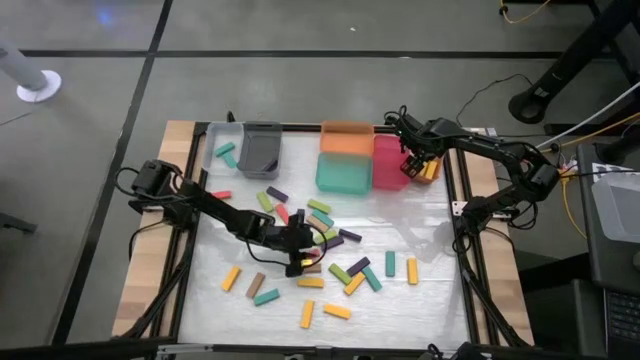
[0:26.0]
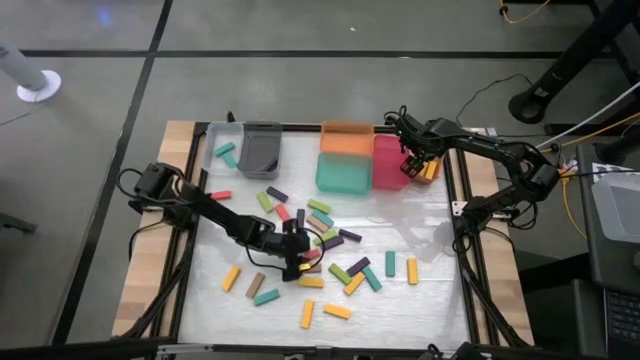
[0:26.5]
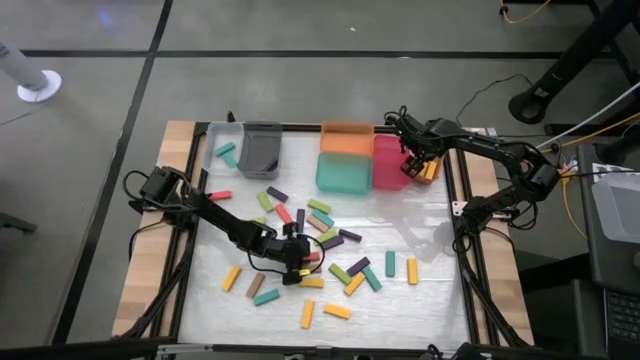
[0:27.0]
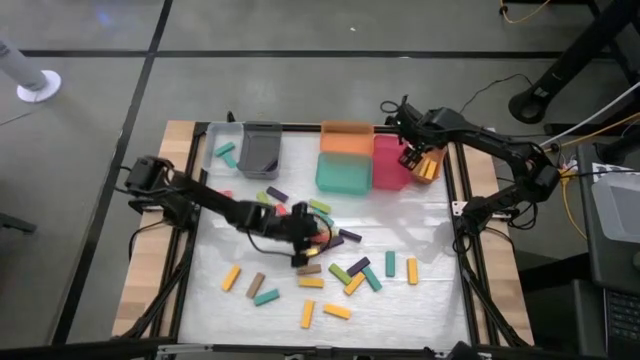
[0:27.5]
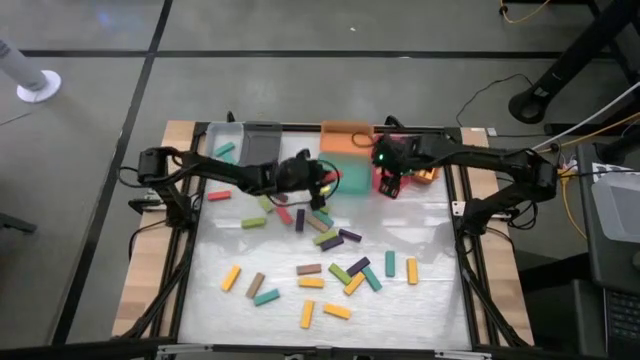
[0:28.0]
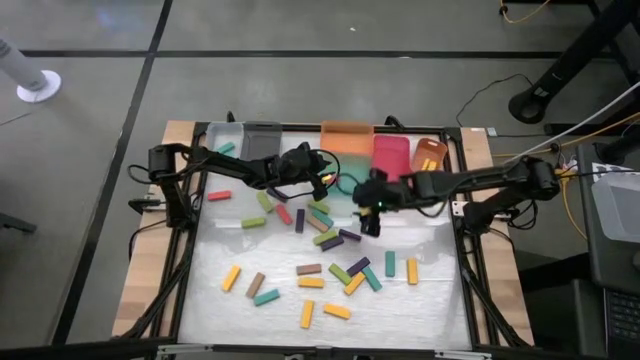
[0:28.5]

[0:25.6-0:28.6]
Task: Sort blocks
Put the orange block into the light blue bin

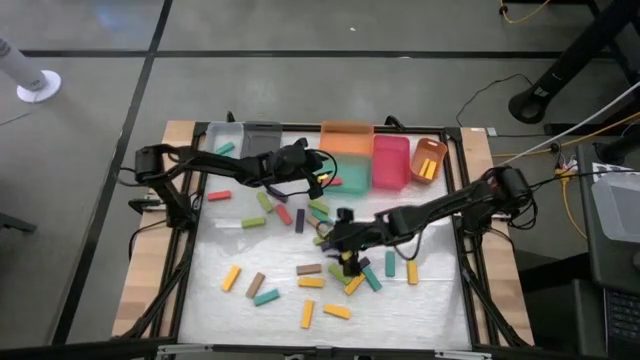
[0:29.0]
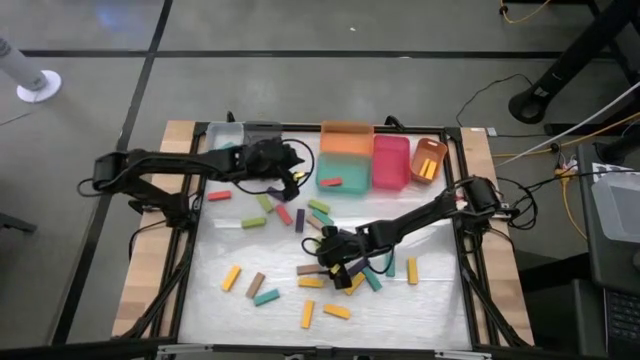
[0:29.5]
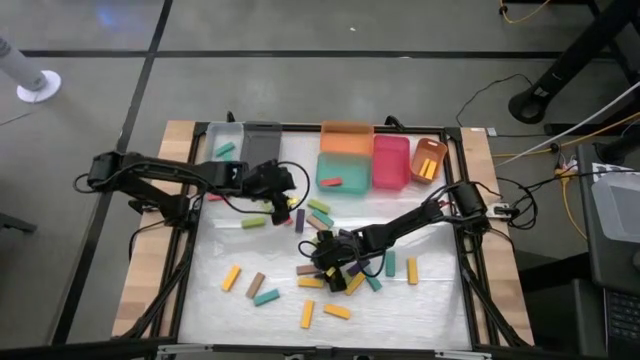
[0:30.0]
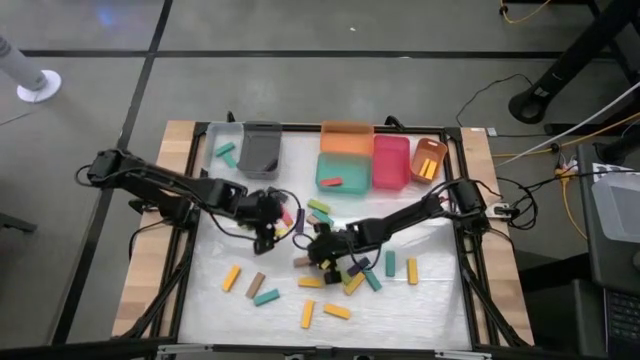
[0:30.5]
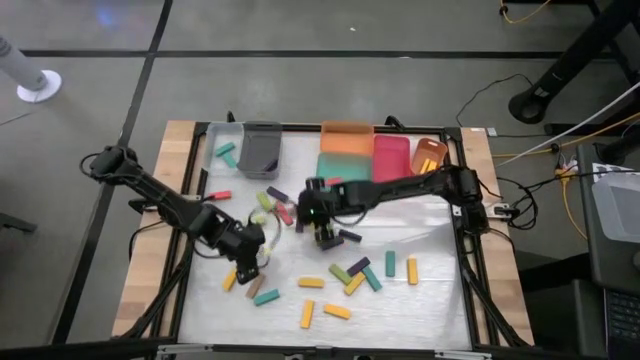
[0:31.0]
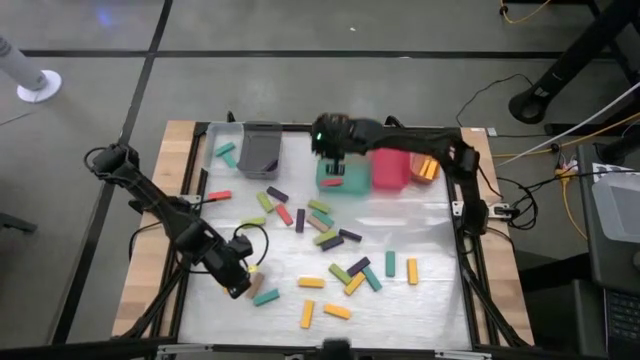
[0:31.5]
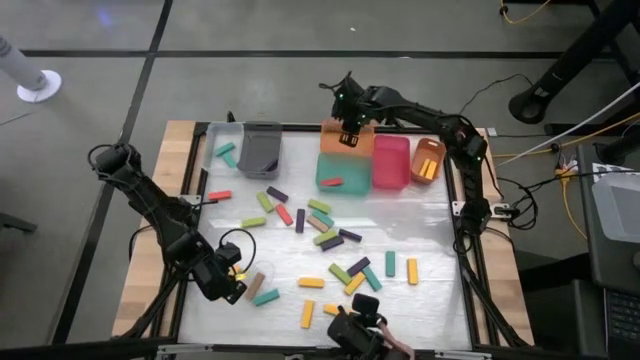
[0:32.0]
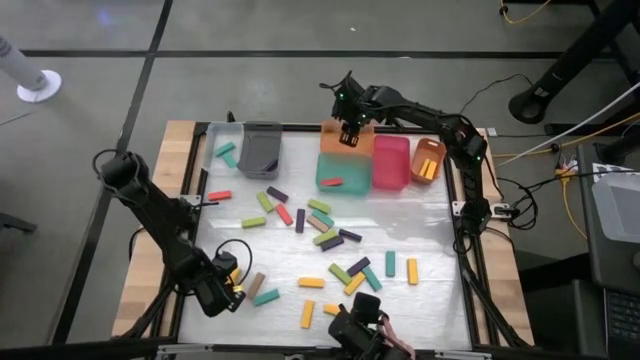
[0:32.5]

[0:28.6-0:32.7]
Put the brown block into the left orange bin

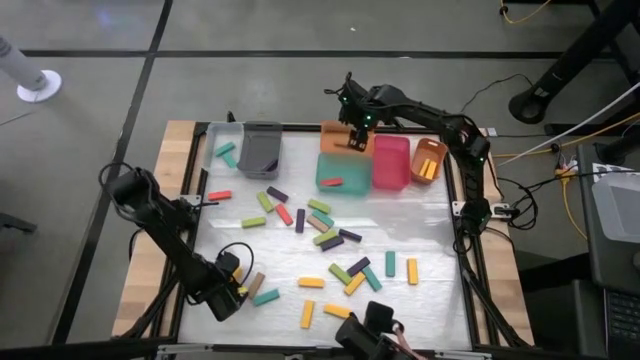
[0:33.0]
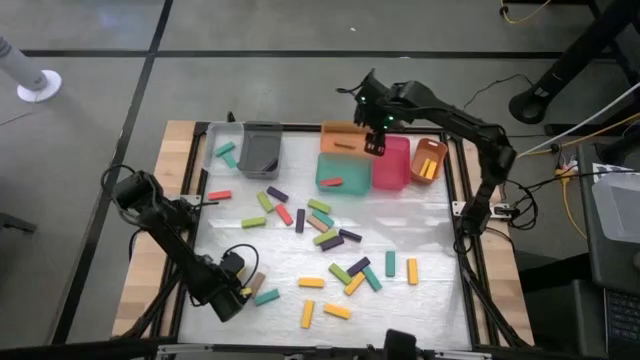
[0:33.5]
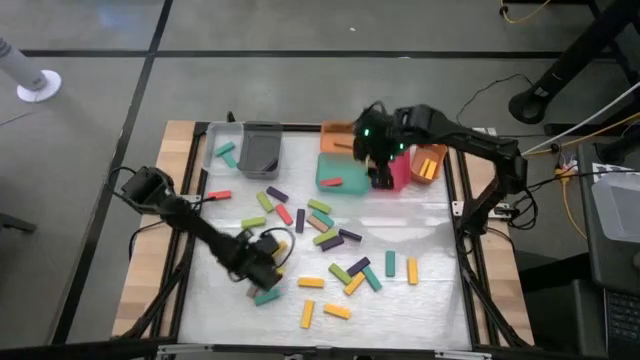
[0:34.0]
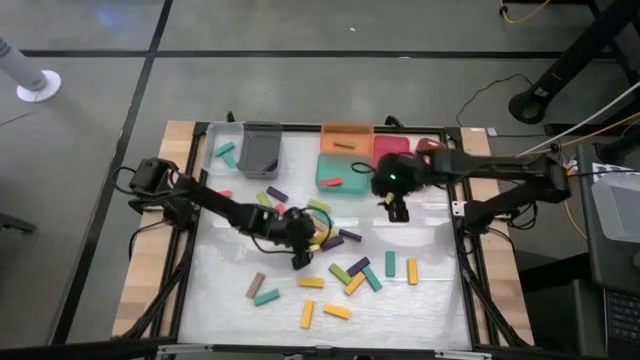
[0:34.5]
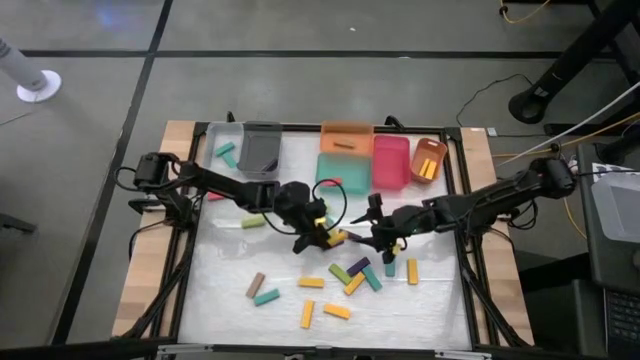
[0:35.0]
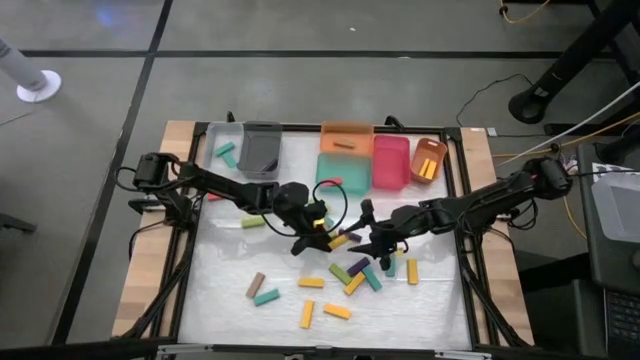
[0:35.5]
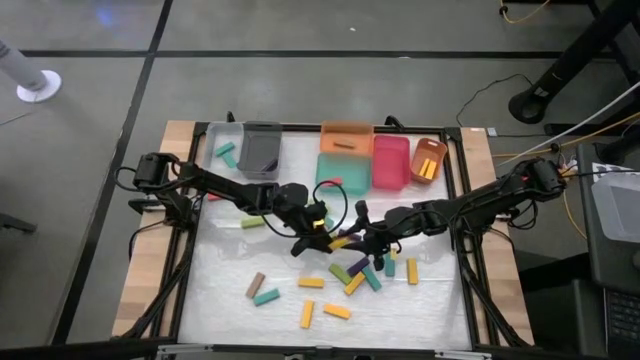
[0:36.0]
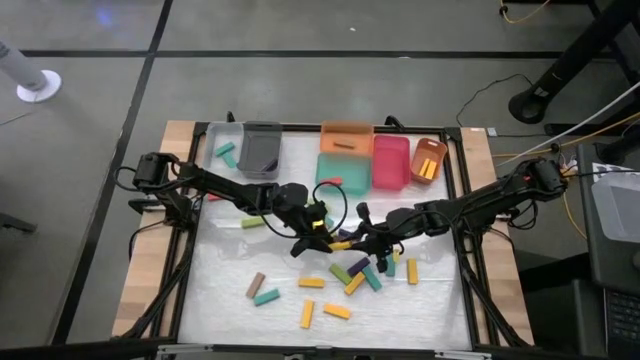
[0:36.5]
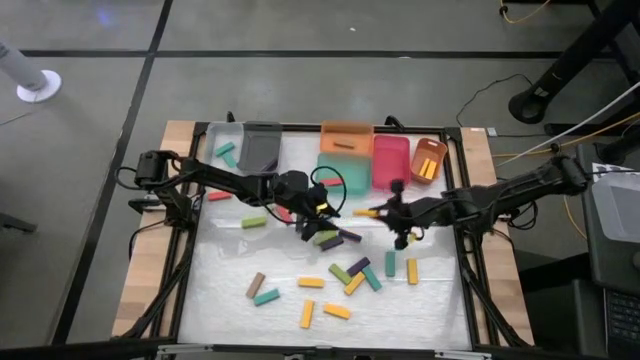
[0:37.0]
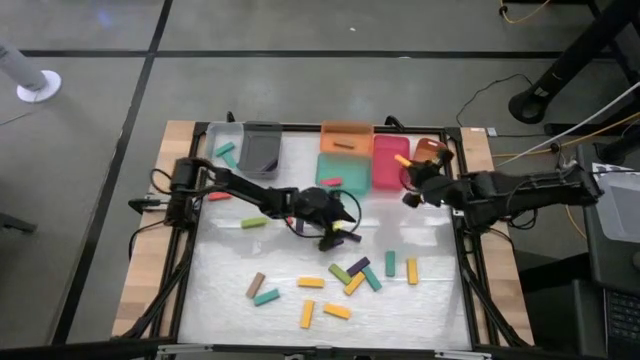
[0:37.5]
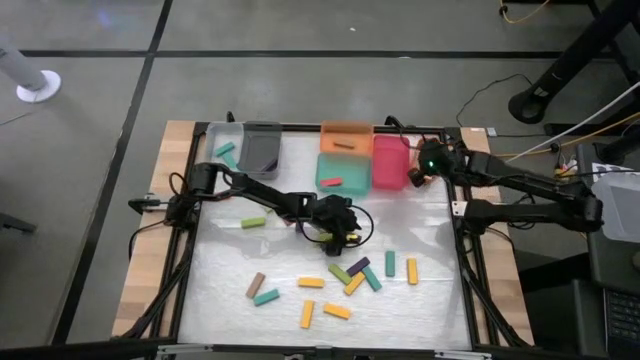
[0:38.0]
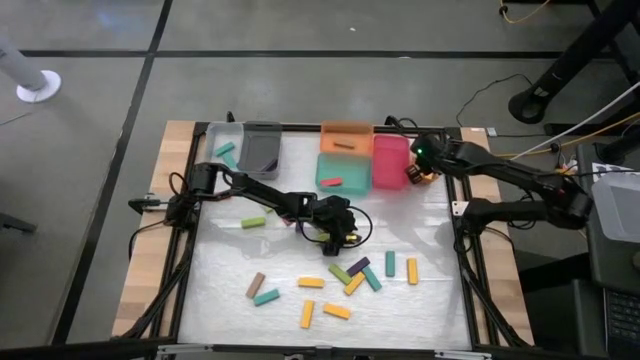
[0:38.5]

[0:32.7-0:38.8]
Put the yellow block into the right orange bin

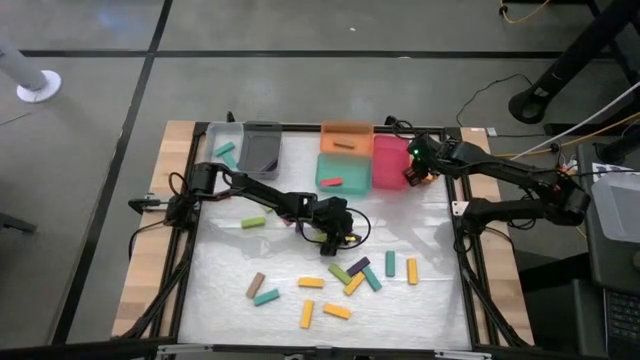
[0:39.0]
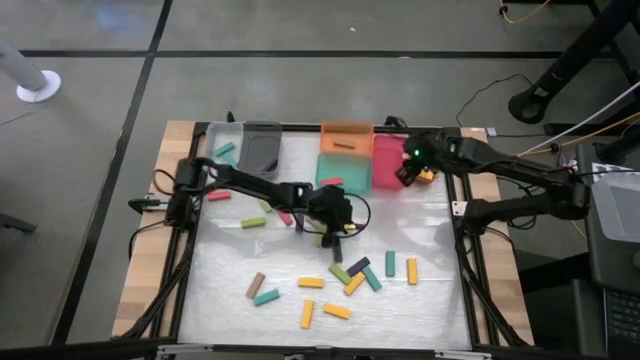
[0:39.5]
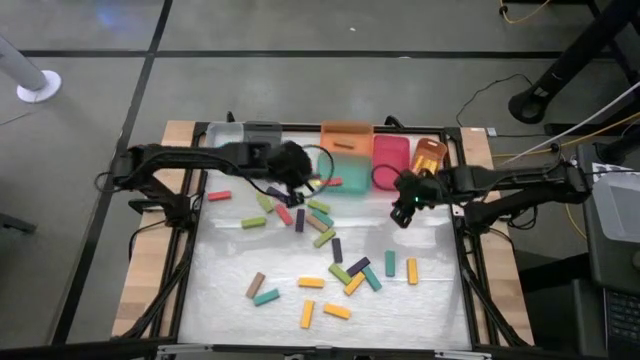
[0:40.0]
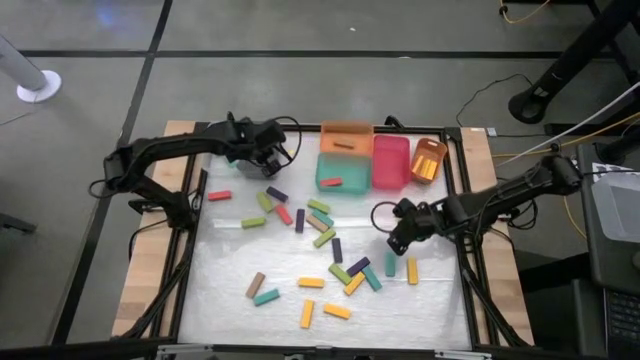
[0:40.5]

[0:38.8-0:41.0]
Put the violet block into the black bin

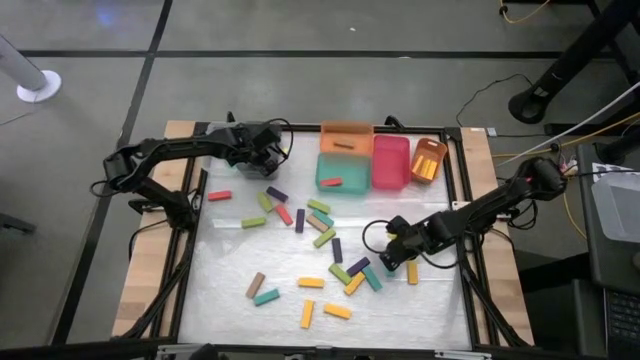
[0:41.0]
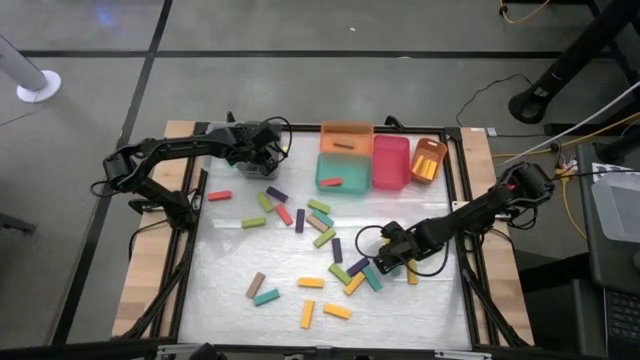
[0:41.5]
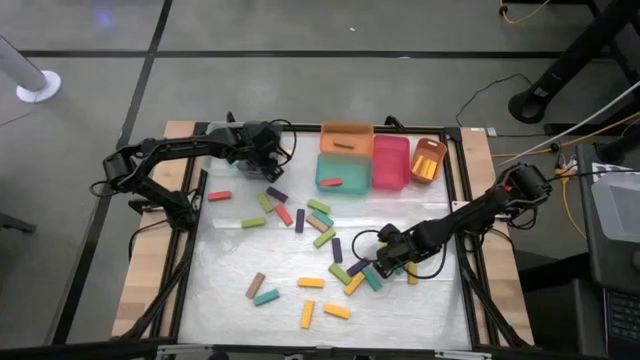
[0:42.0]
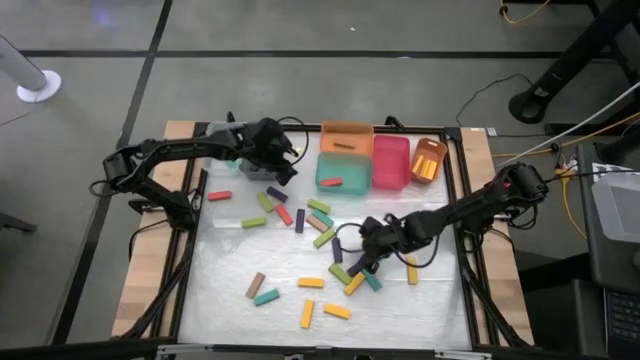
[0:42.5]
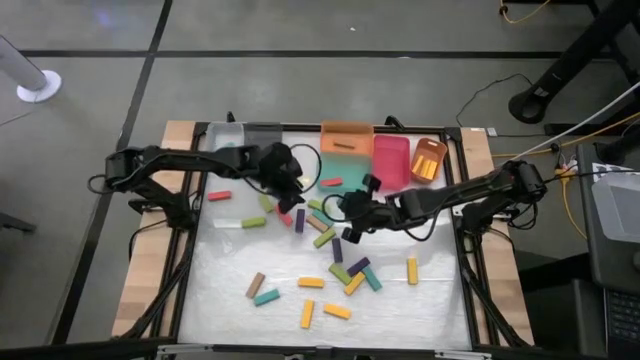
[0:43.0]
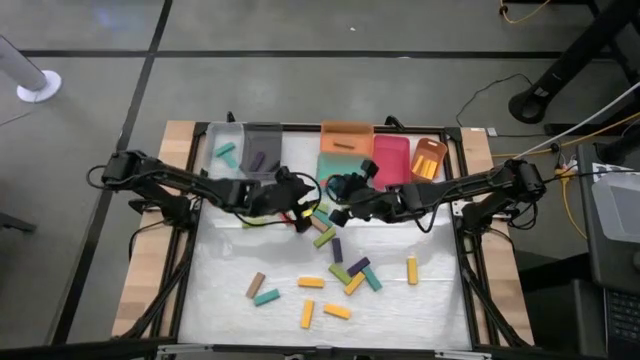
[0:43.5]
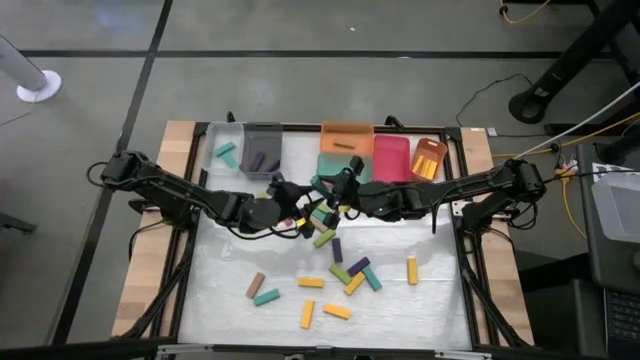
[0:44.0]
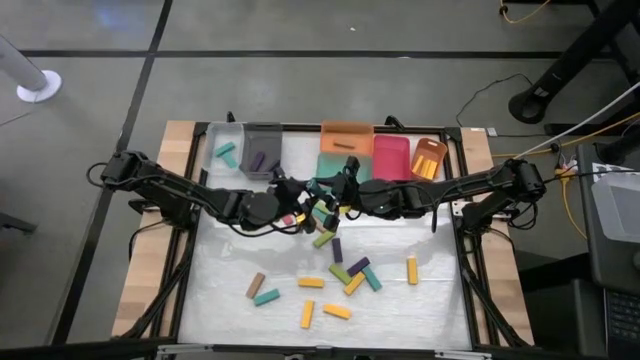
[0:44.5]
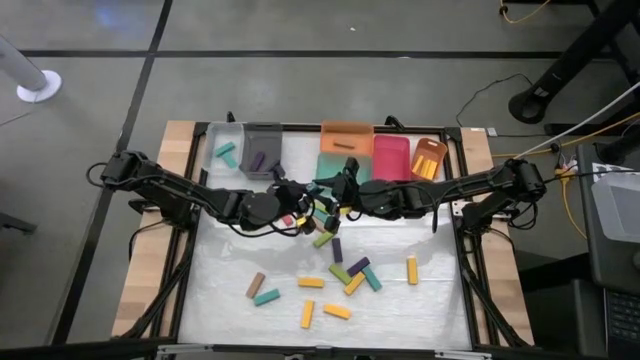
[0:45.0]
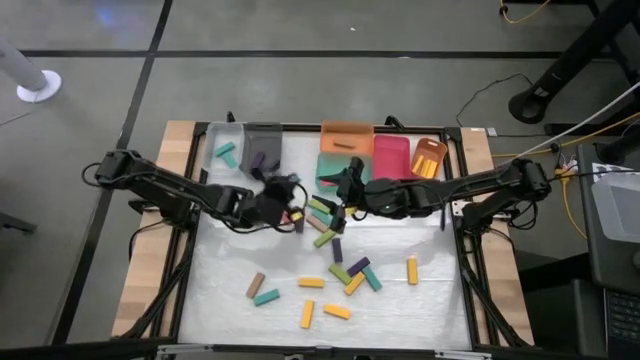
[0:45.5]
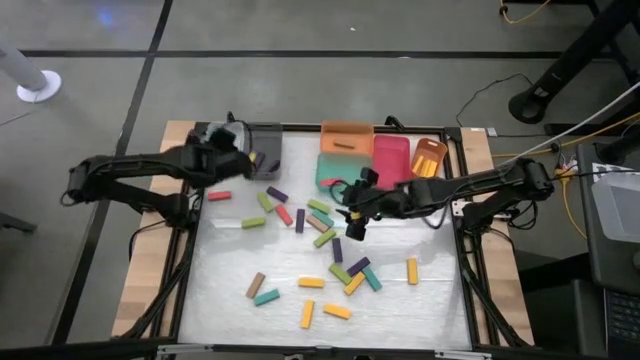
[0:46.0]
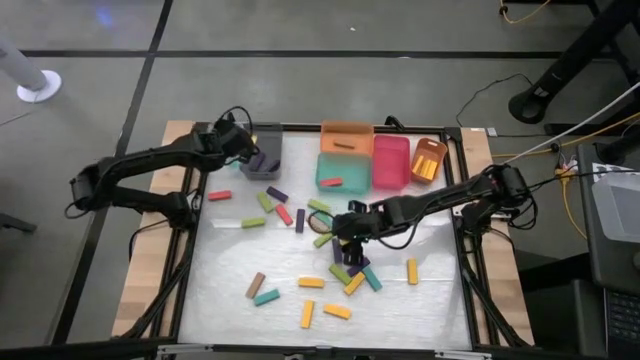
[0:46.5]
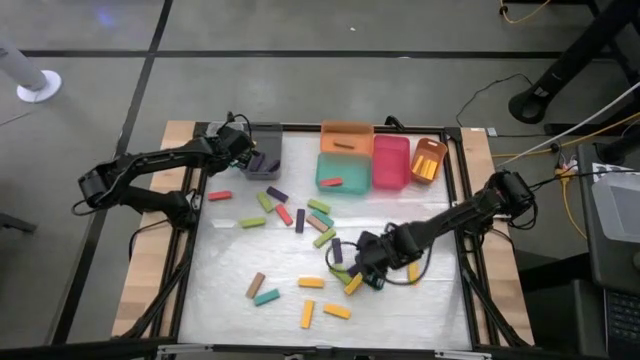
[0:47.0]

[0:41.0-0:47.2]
Put the light blue block into the transparent bin
